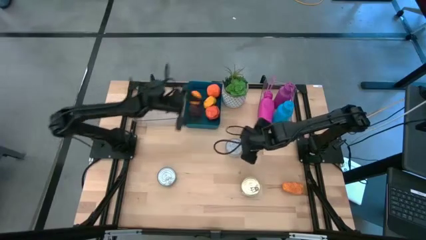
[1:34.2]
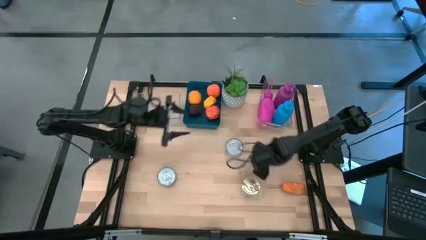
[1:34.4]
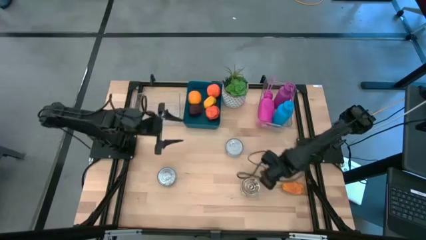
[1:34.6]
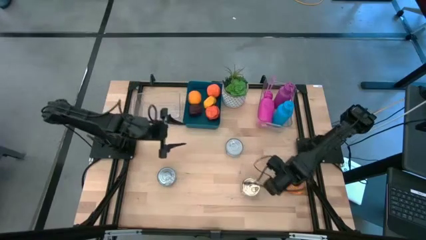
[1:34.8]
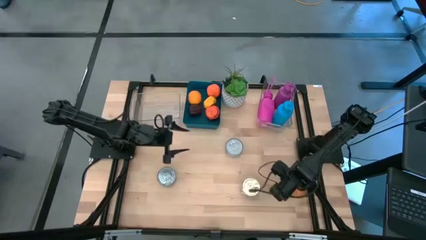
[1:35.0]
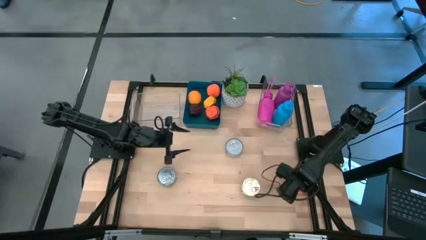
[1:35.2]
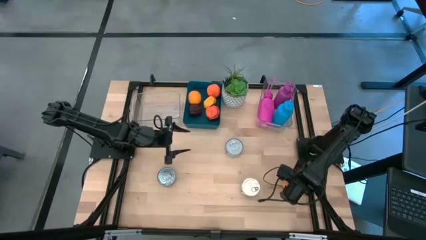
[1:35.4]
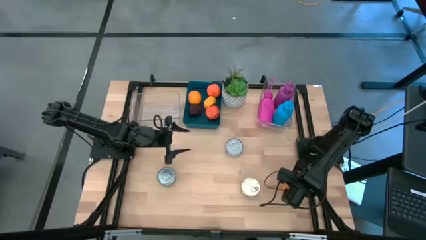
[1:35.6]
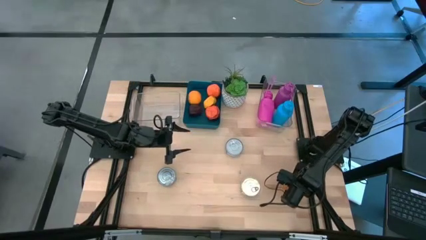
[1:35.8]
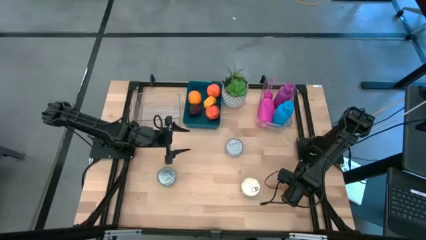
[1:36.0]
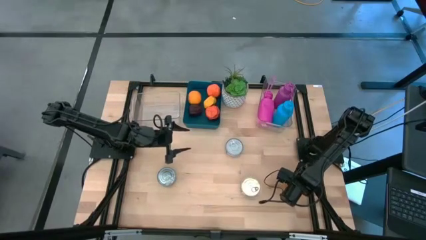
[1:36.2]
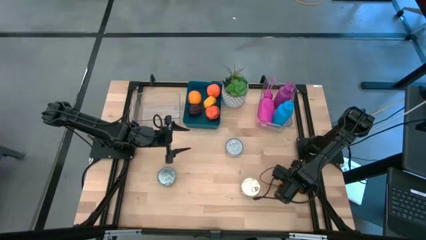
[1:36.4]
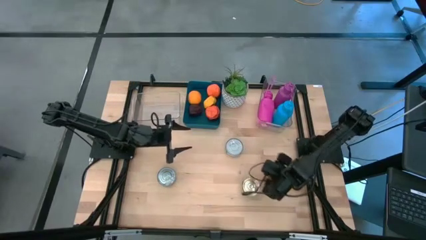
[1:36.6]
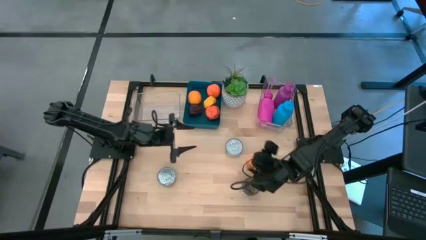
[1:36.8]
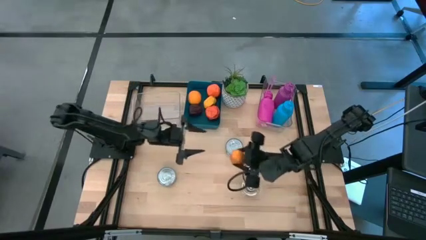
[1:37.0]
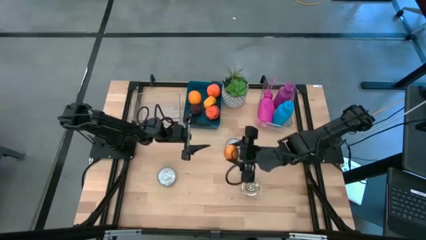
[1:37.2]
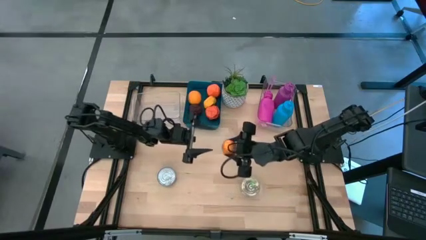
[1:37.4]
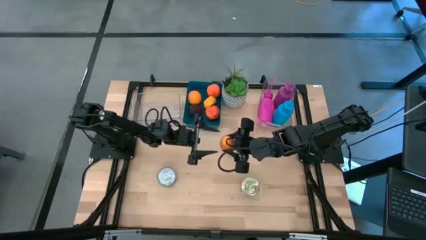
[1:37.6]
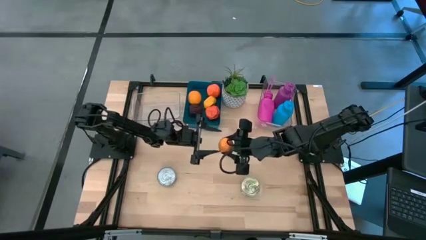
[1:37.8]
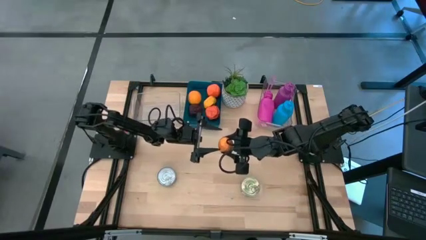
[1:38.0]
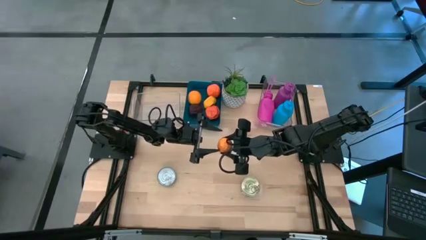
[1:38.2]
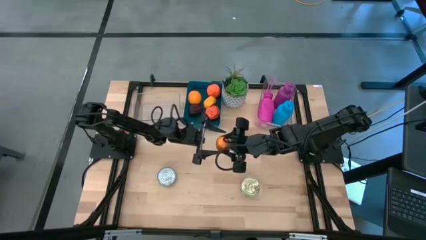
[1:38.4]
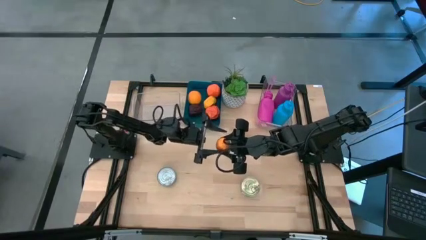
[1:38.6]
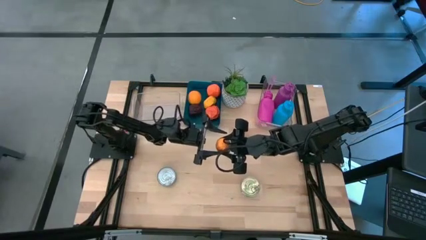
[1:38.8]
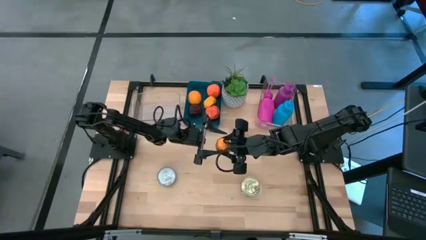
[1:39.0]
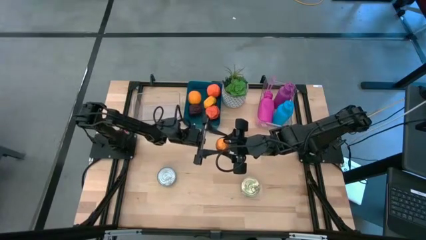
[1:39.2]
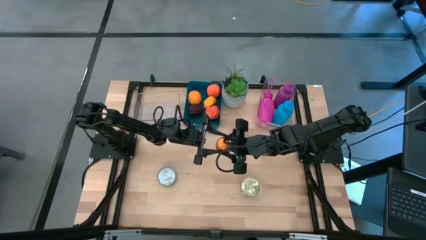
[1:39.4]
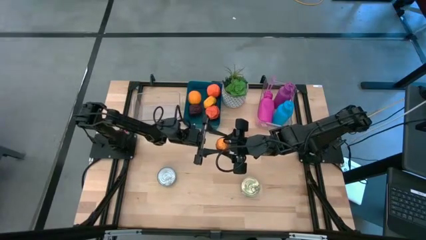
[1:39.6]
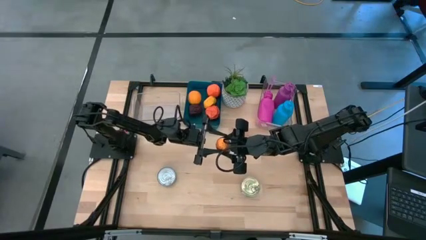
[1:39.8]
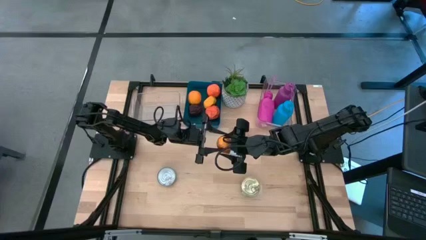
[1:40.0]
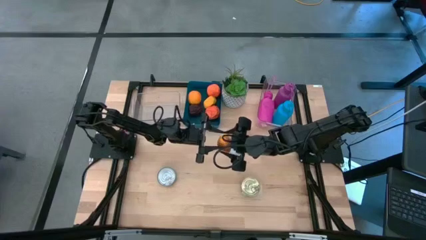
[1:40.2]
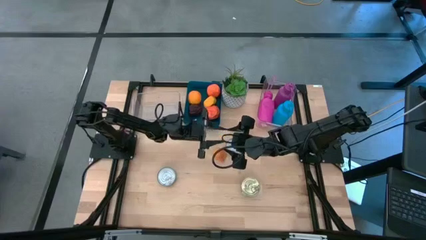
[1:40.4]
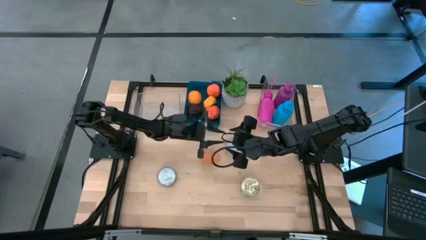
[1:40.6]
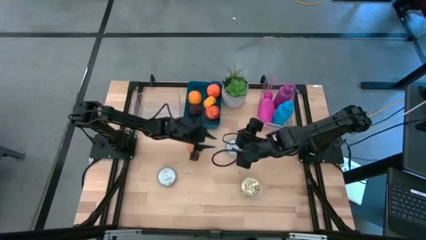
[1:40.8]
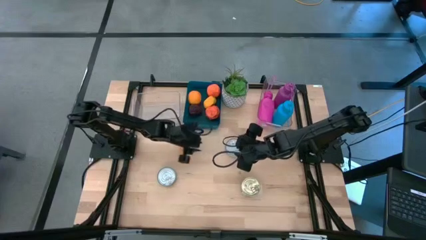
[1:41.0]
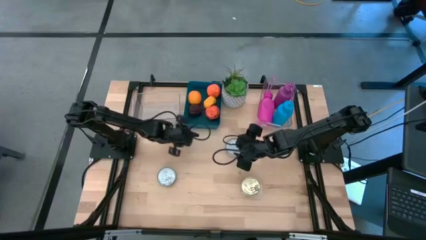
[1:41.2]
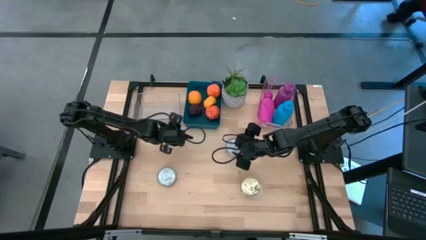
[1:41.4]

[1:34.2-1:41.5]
Task: Pick & Place Food Item
Put the mango into the blue bin

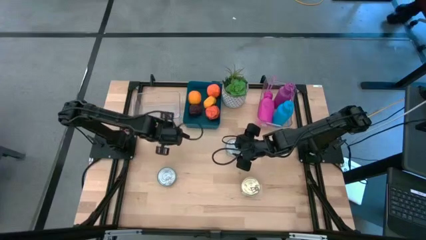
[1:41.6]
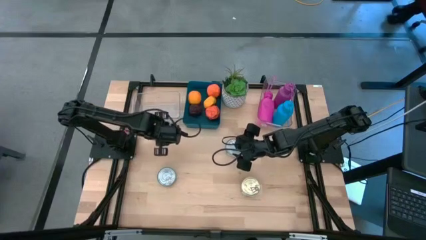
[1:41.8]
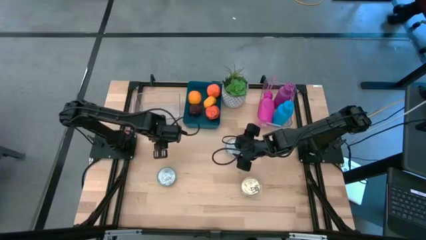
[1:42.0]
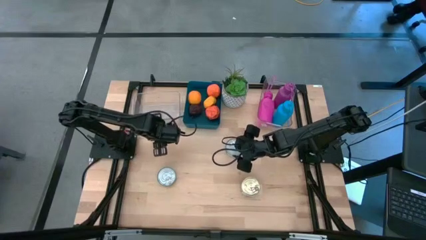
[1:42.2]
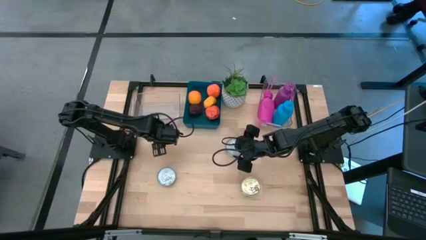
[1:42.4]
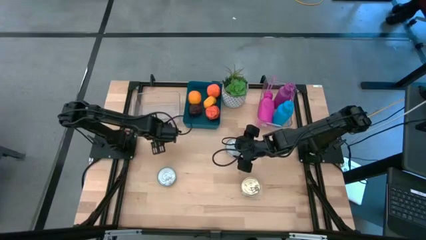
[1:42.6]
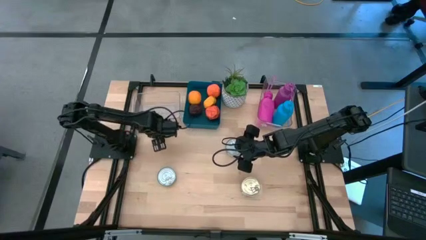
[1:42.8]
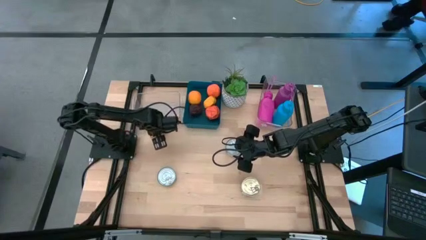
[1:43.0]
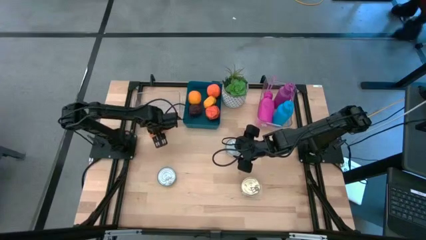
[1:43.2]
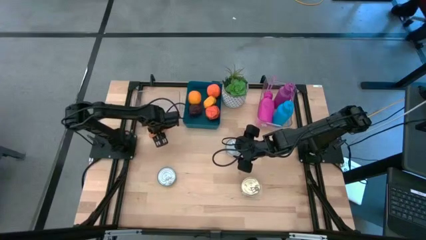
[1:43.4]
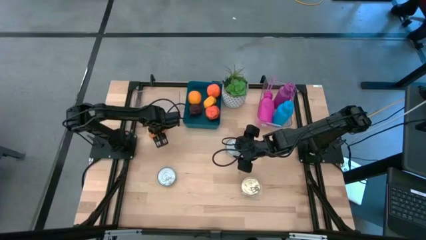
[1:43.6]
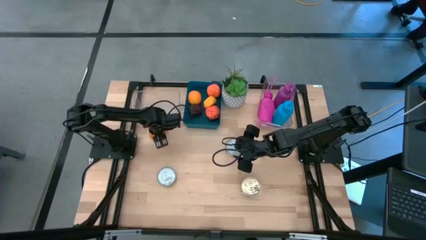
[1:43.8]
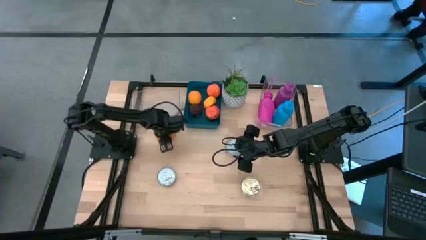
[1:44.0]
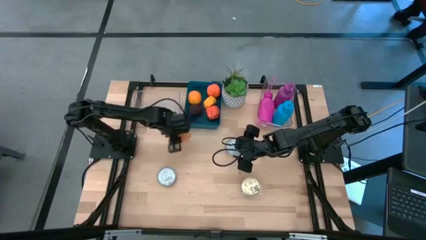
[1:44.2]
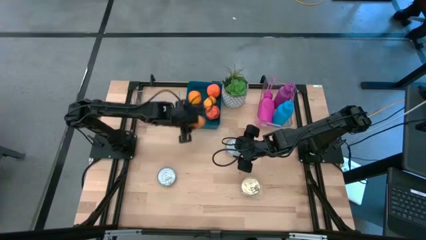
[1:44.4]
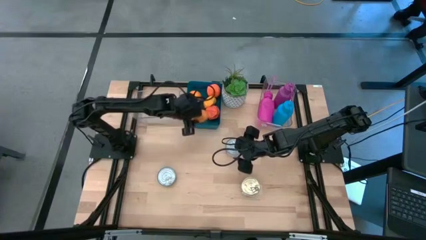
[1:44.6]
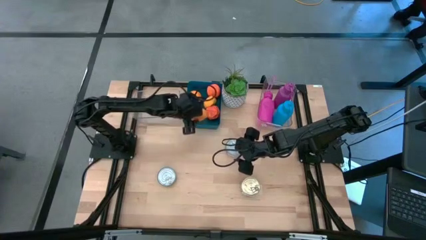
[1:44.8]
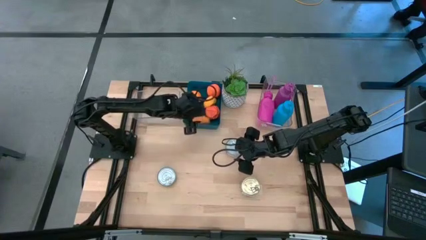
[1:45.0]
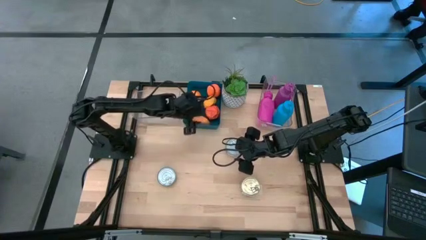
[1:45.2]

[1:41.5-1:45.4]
Put the mango into the blue bin

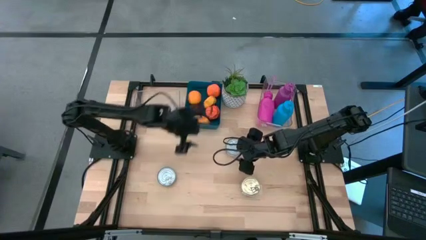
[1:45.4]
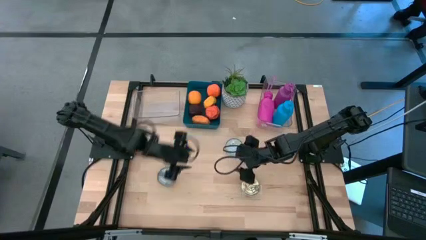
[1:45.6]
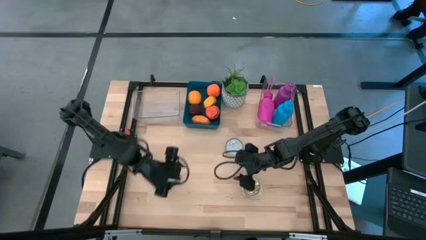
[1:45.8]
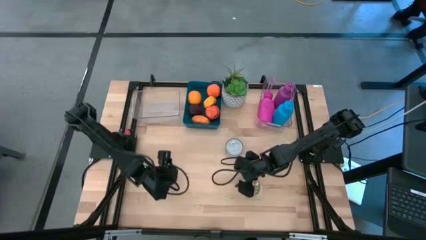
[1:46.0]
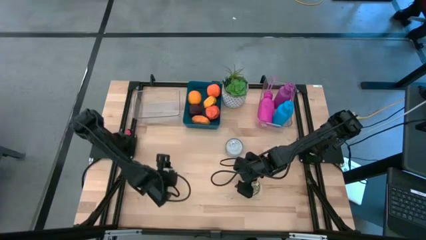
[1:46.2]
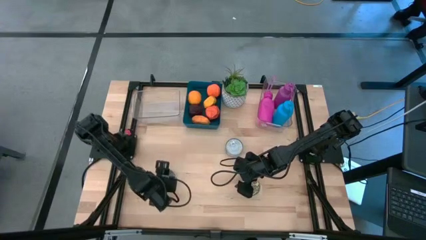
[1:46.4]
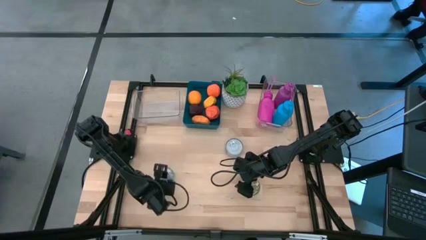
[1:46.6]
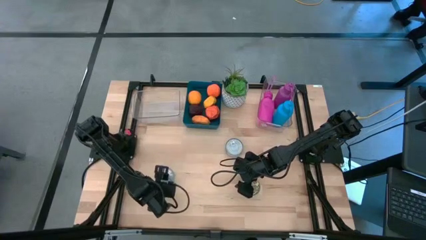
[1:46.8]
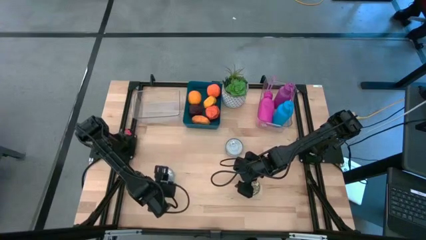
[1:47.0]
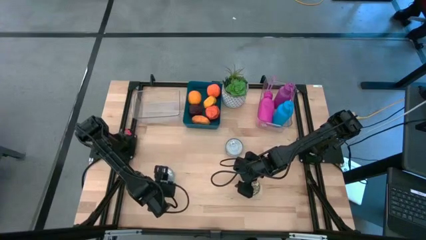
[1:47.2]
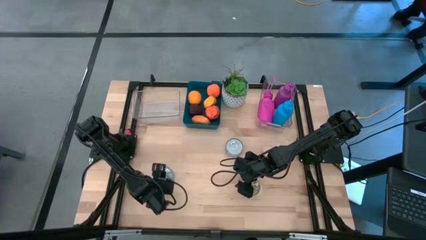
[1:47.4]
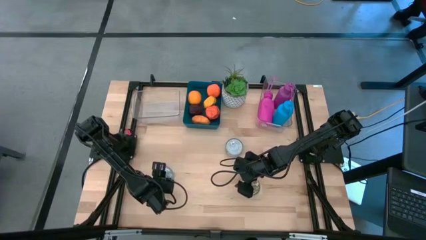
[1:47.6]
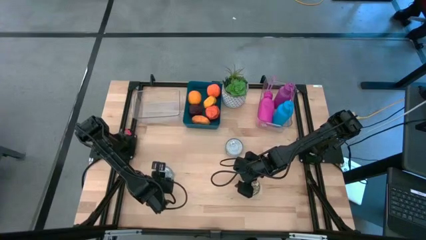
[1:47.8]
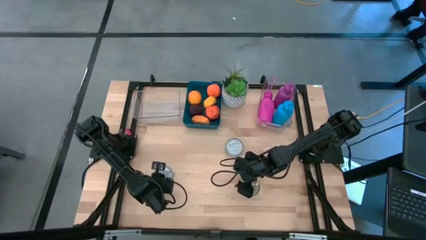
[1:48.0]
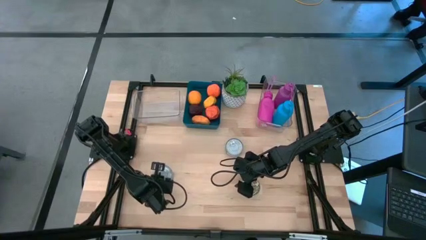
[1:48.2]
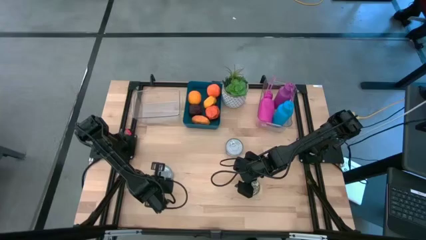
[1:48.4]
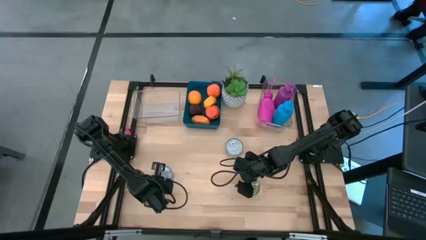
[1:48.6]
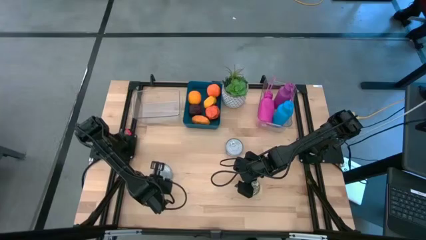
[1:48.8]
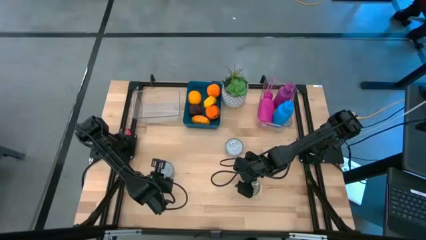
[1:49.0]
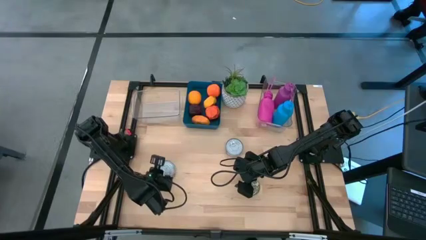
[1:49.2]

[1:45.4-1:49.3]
Put the light blue tuna can into the left transparent bin
